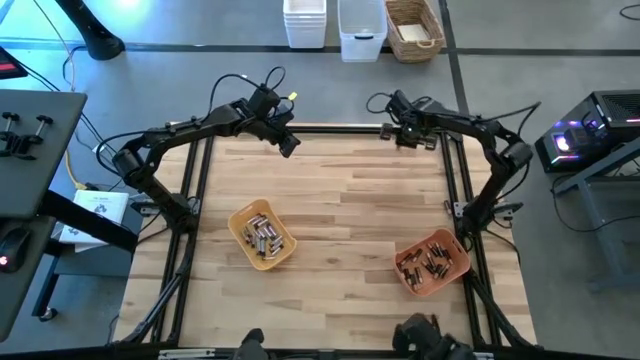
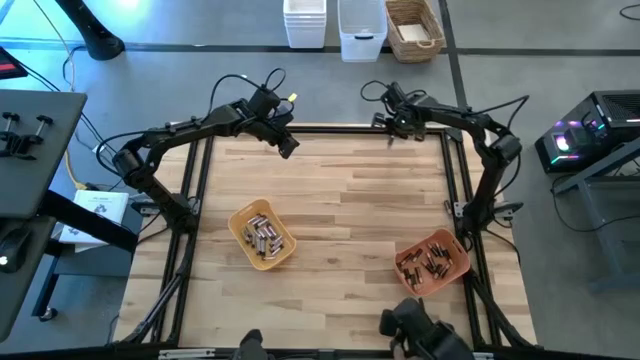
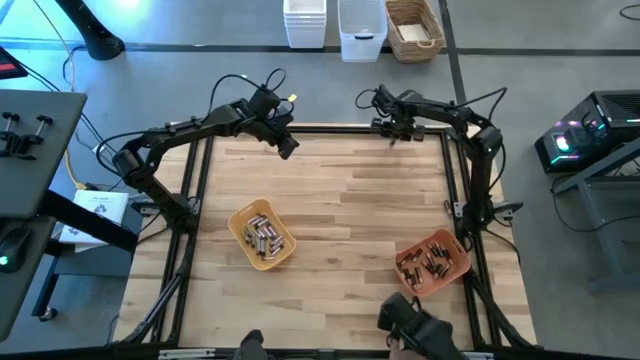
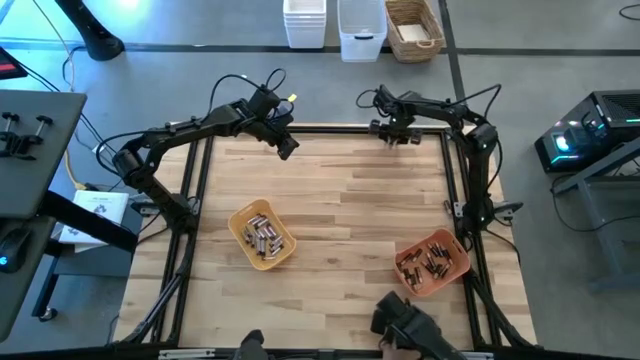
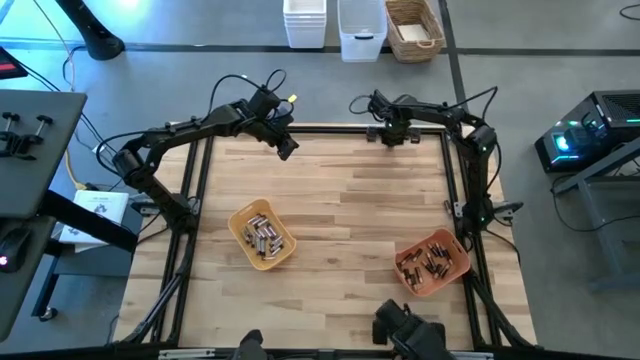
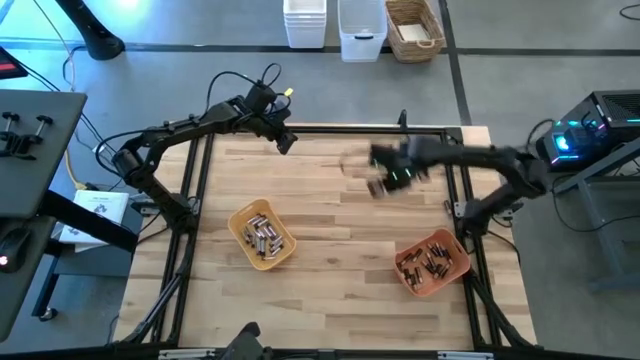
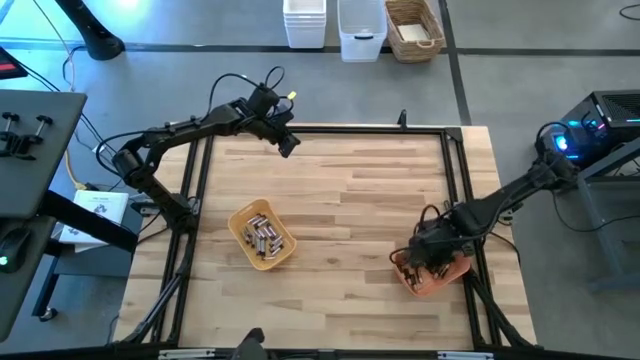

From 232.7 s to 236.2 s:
Task: Sort batteries
Put the black battery into the orange bin

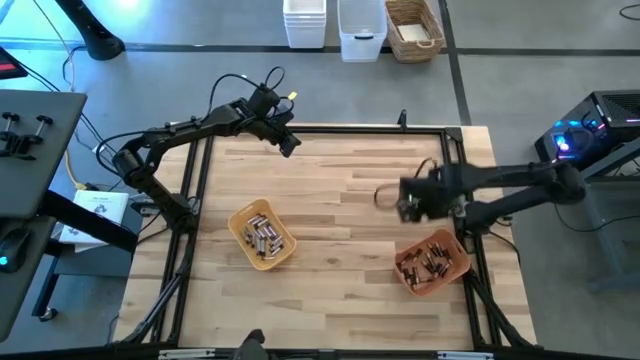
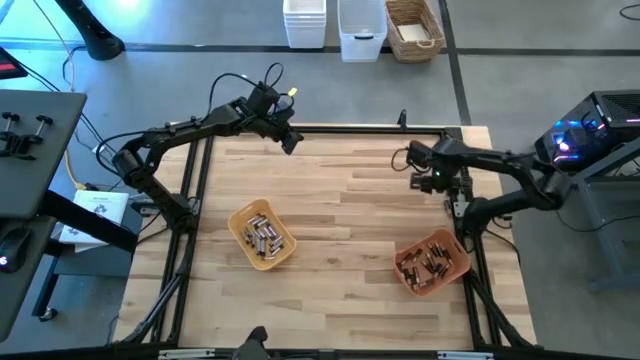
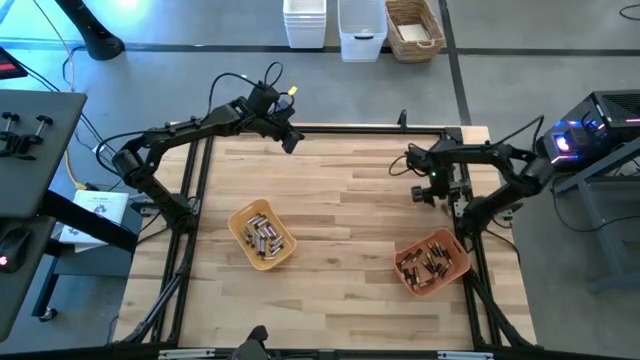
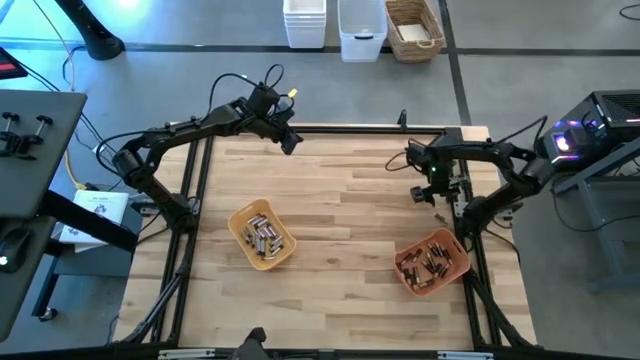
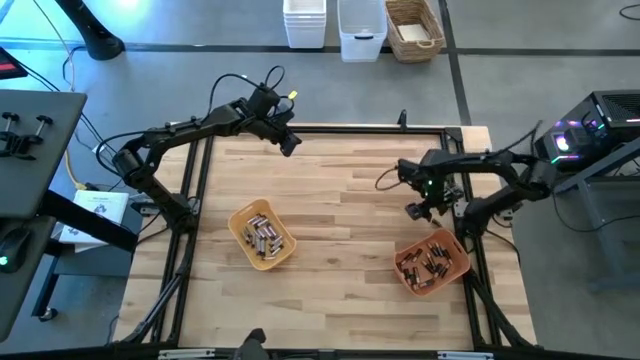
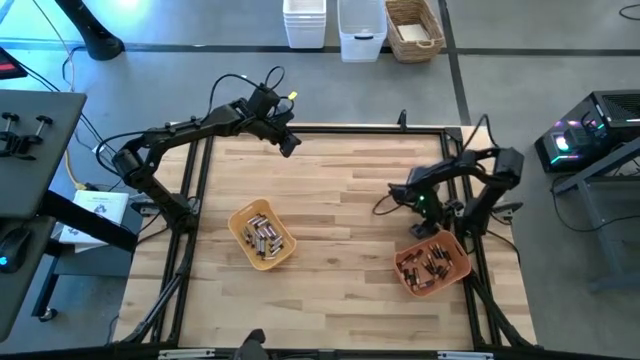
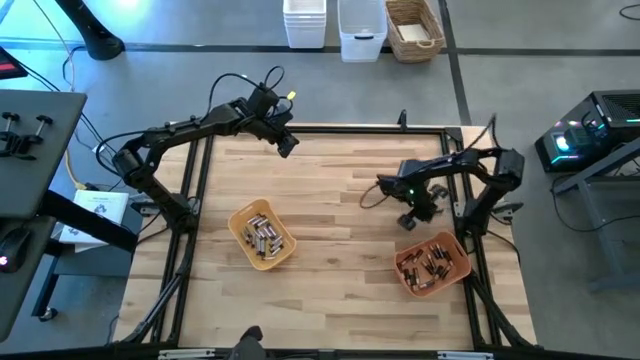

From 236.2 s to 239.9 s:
Put the black battery into the orange bin

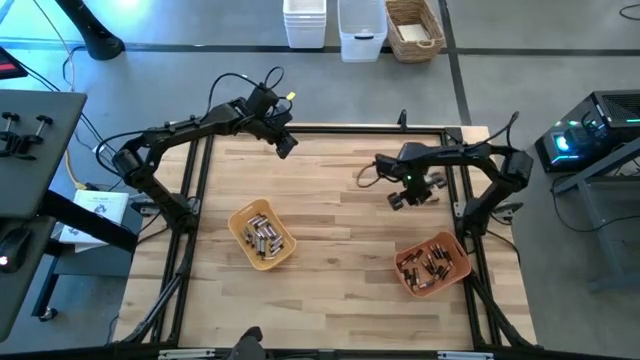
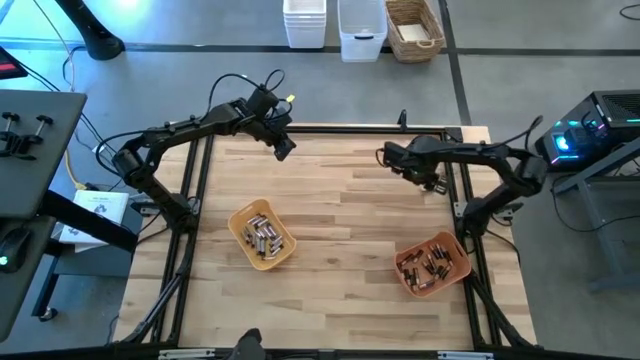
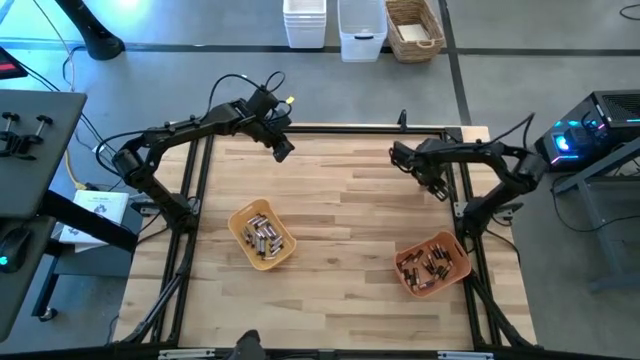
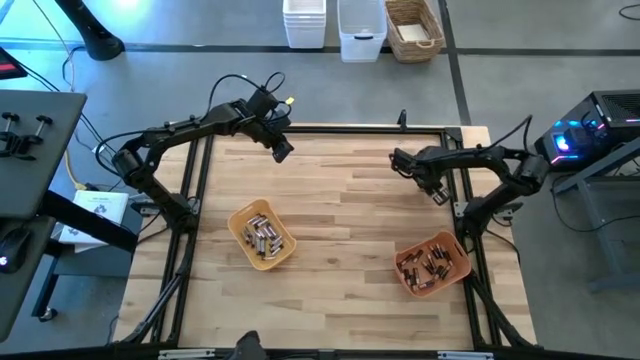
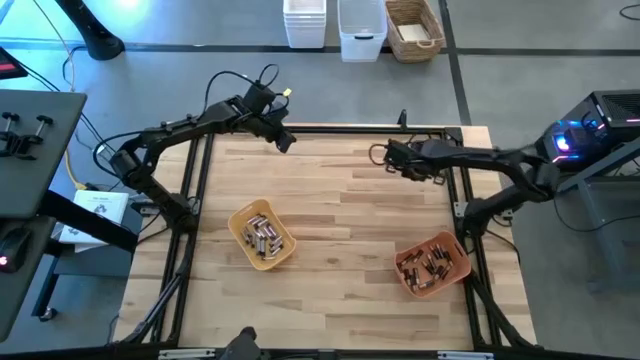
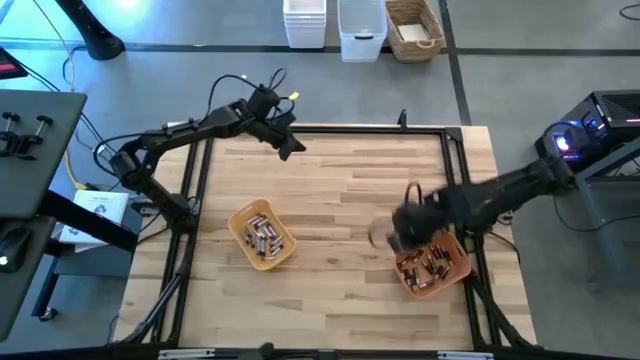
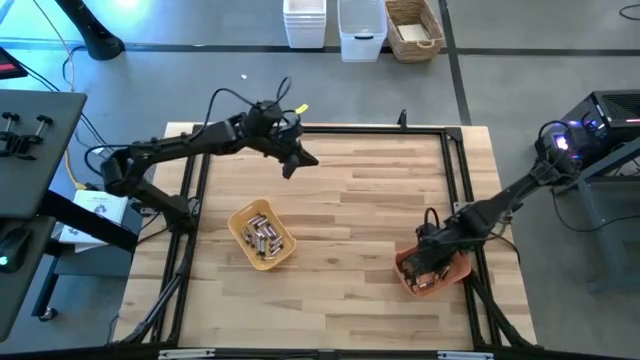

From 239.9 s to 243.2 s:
Put the black battery into the orange bin

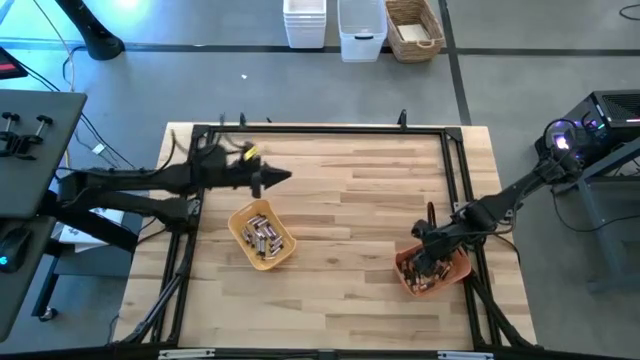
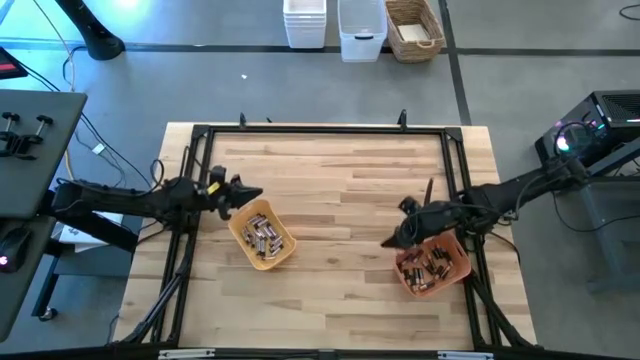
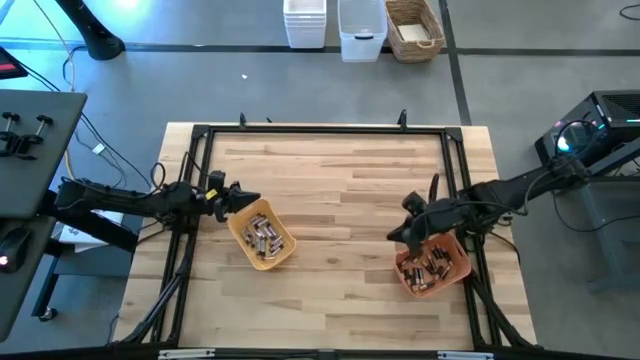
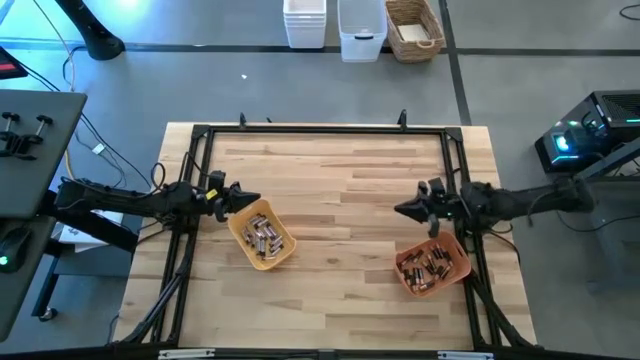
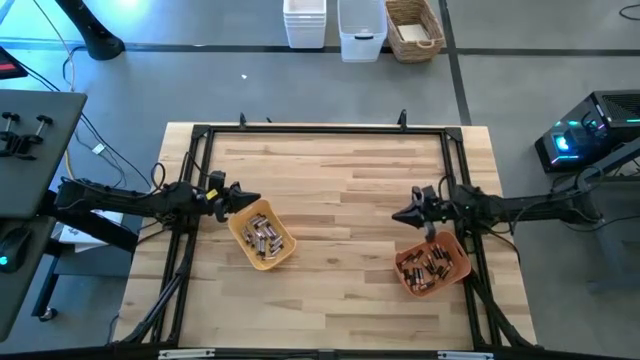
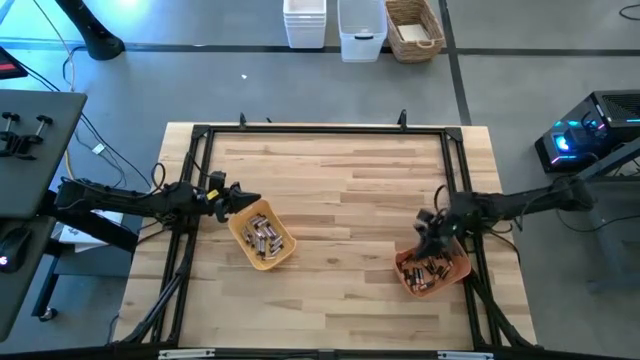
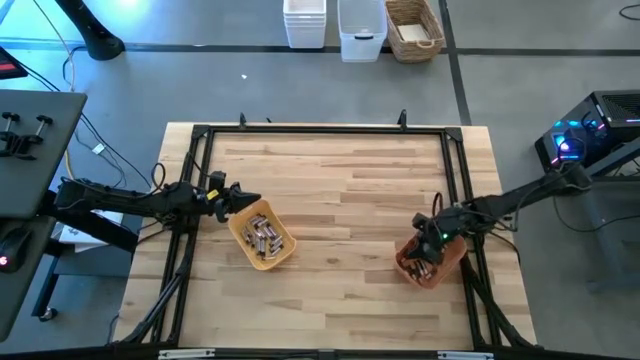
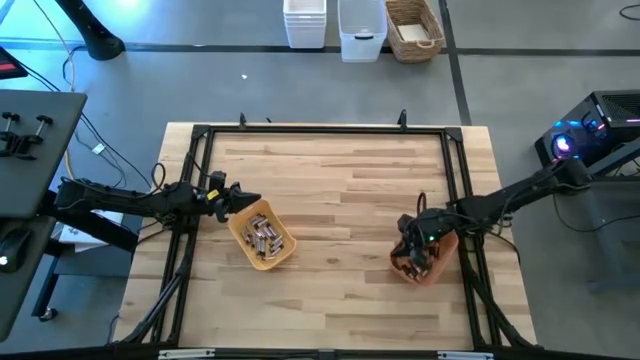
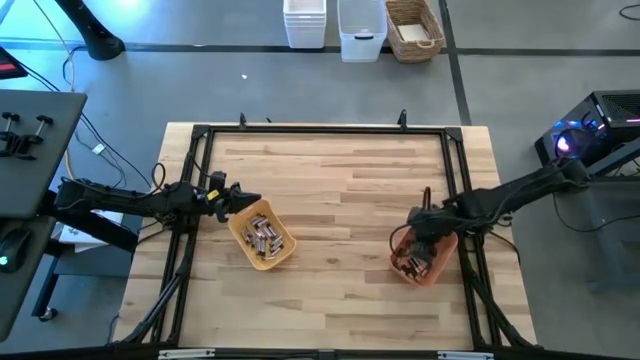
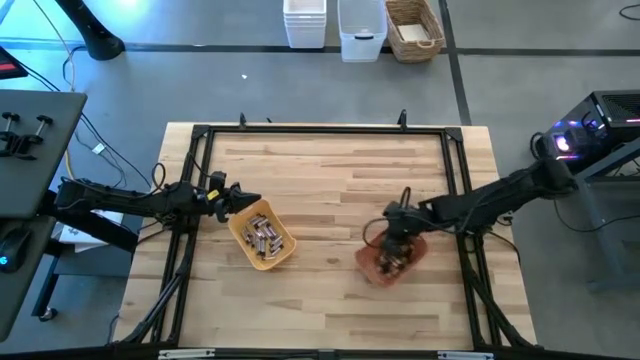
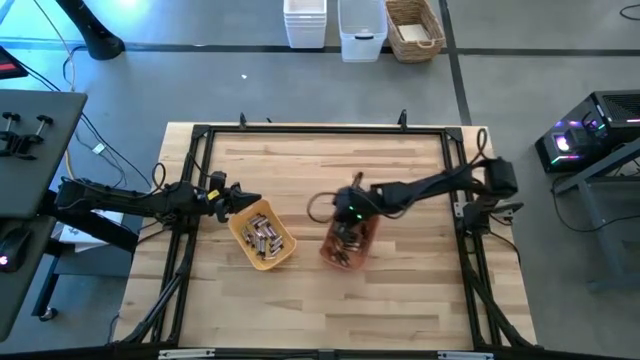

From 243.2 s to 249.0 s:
Move the orange bin to the center of the table

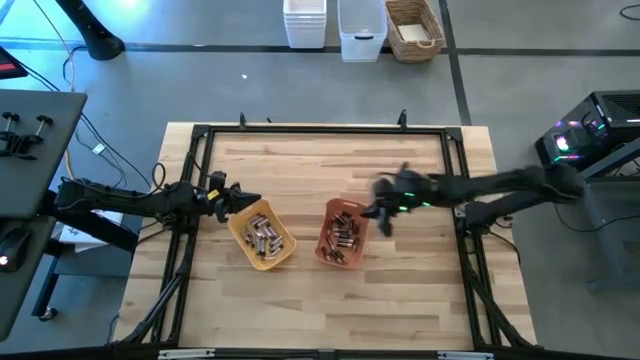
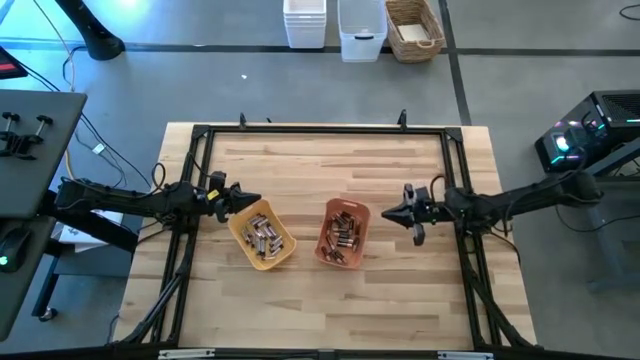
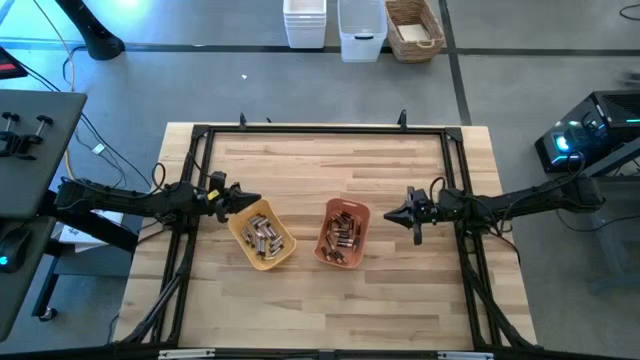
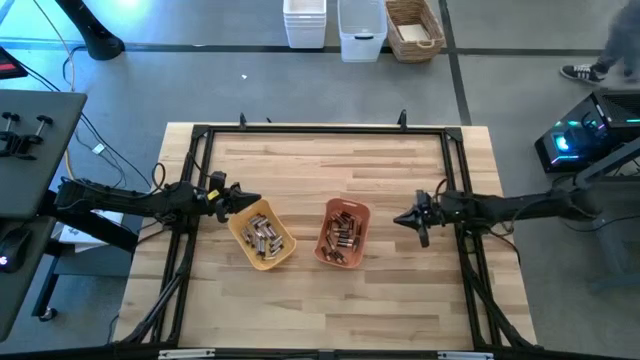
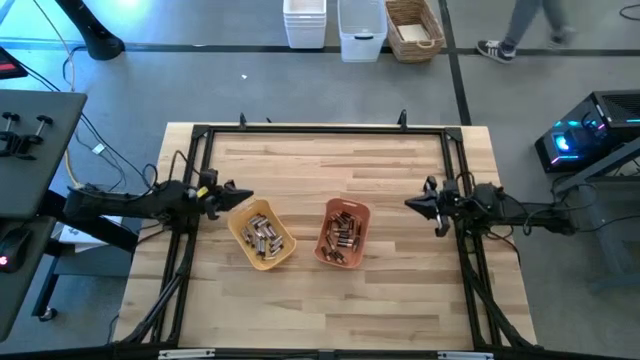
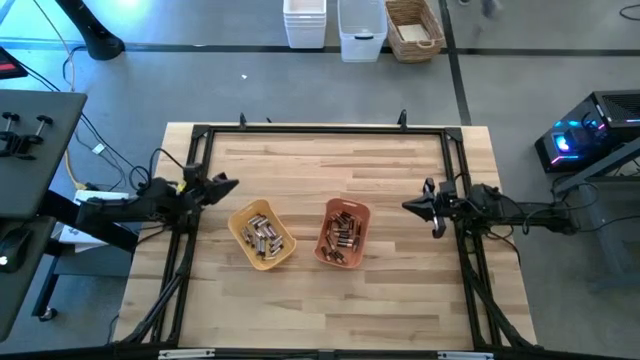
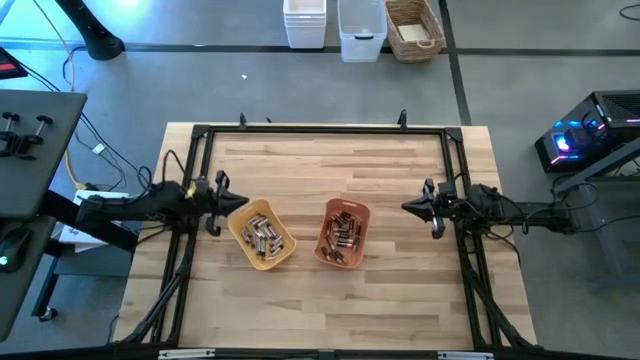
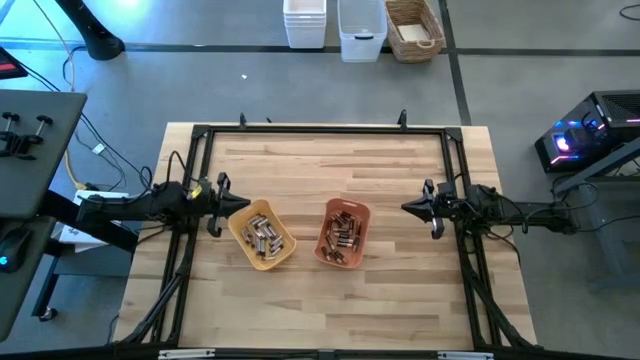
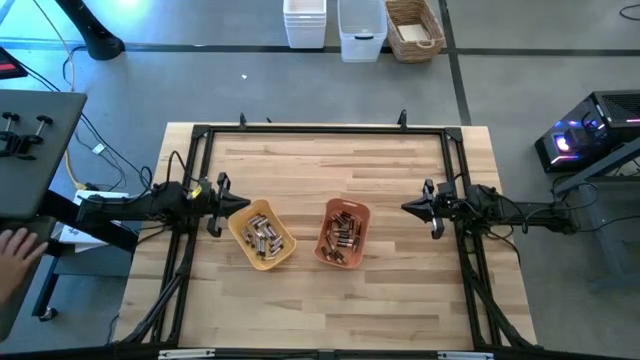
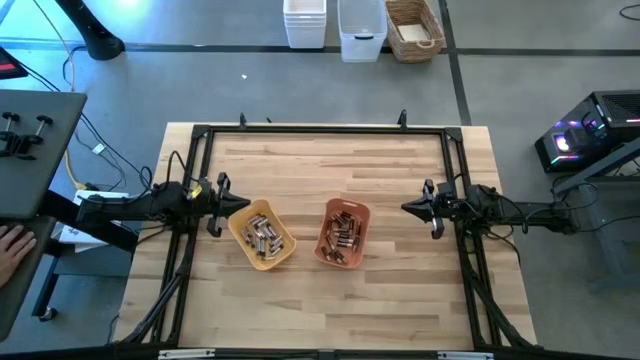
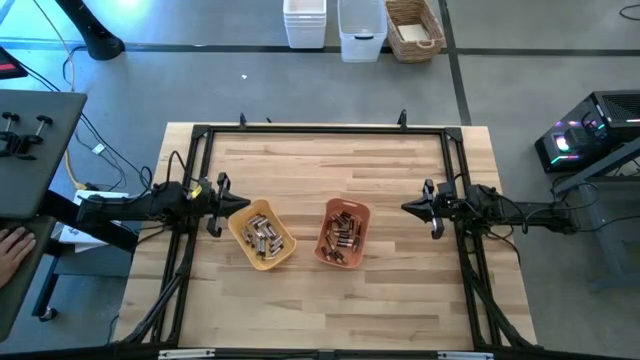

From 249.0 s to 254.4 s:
Return to Home Position
